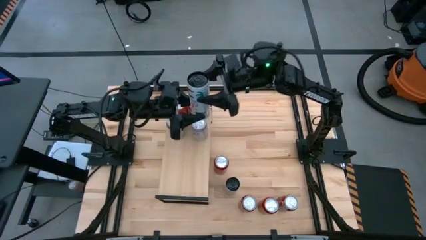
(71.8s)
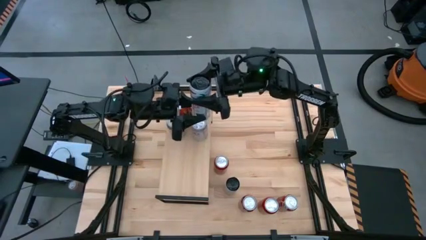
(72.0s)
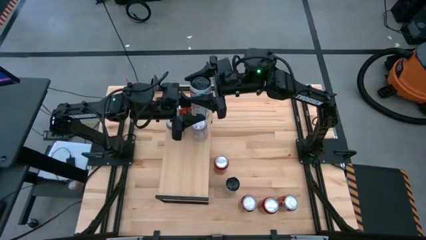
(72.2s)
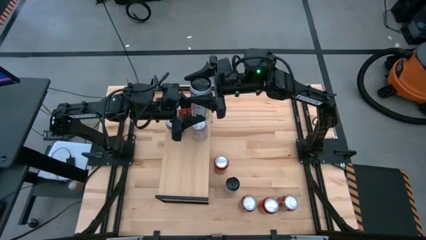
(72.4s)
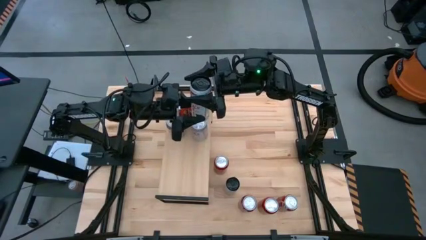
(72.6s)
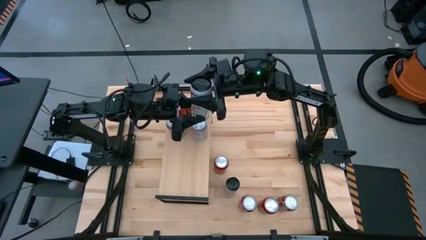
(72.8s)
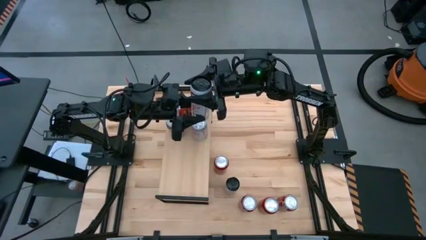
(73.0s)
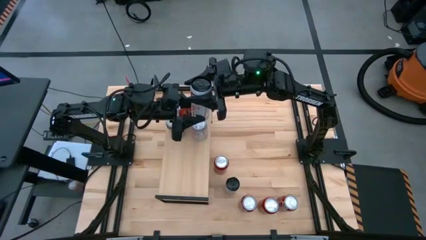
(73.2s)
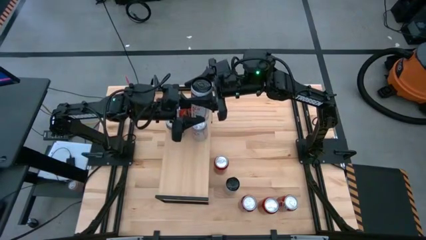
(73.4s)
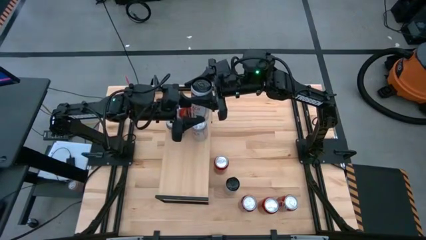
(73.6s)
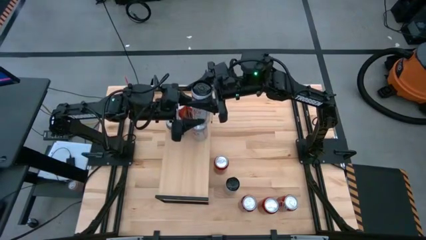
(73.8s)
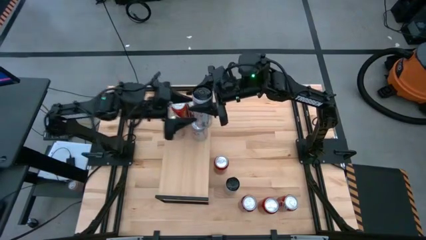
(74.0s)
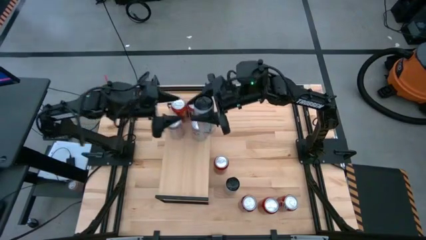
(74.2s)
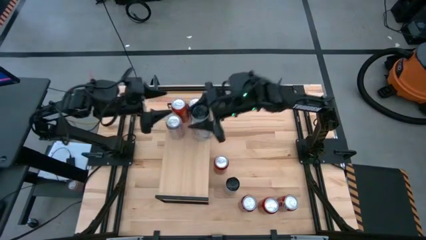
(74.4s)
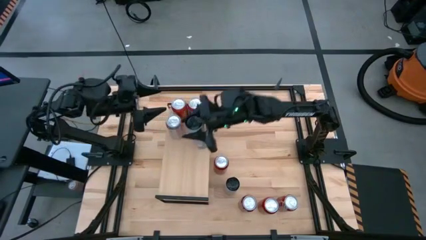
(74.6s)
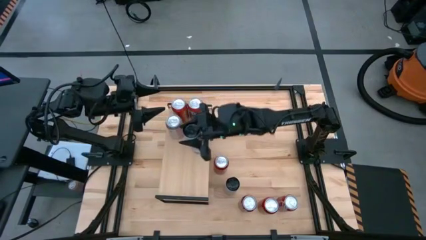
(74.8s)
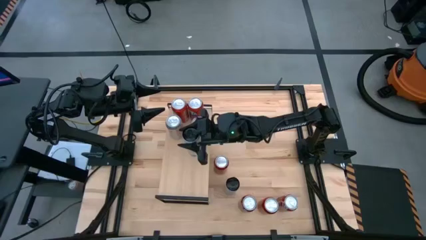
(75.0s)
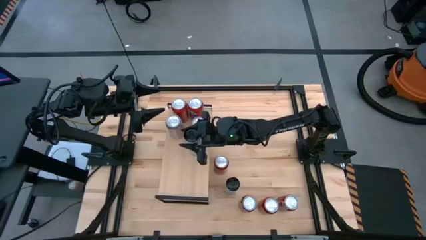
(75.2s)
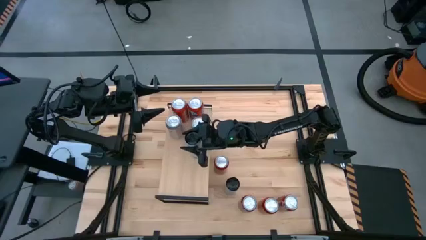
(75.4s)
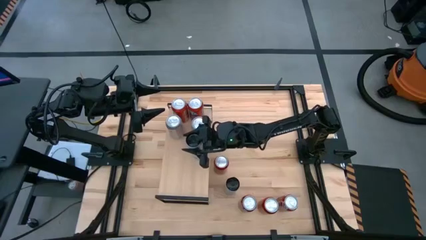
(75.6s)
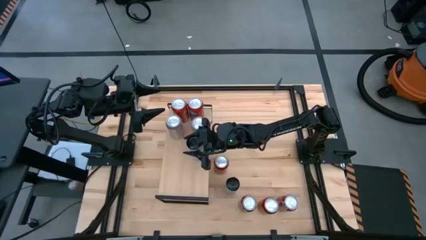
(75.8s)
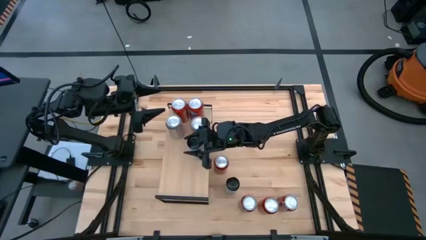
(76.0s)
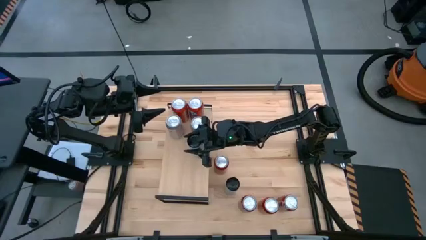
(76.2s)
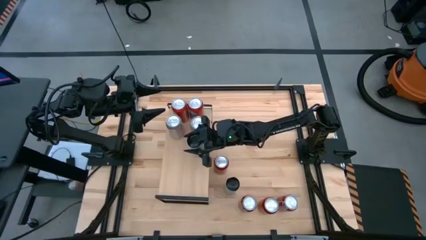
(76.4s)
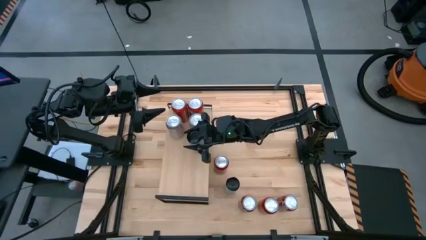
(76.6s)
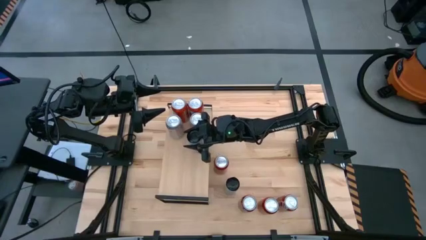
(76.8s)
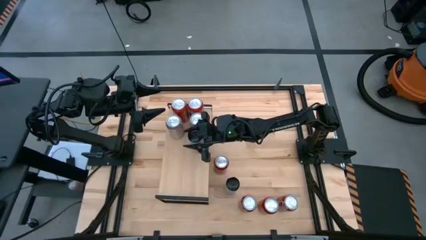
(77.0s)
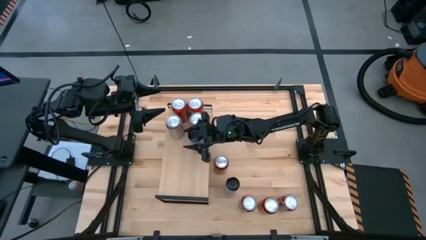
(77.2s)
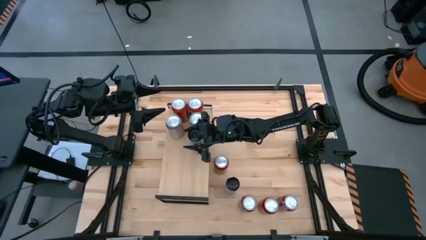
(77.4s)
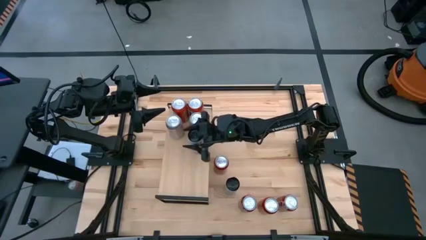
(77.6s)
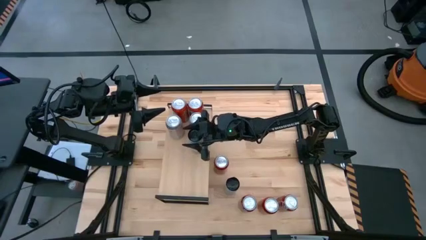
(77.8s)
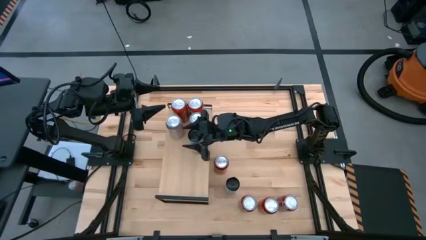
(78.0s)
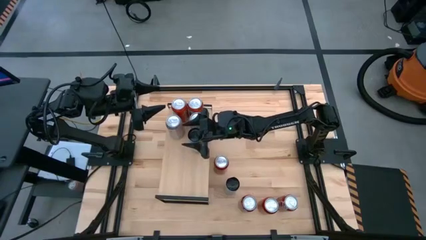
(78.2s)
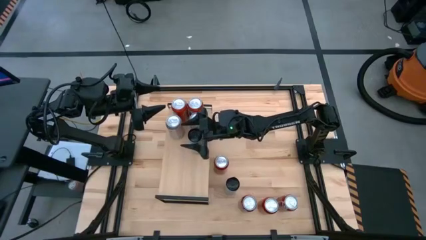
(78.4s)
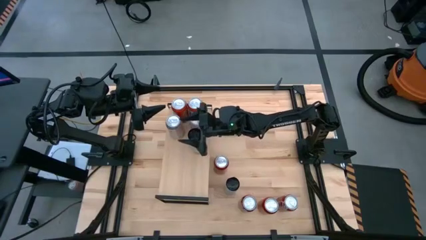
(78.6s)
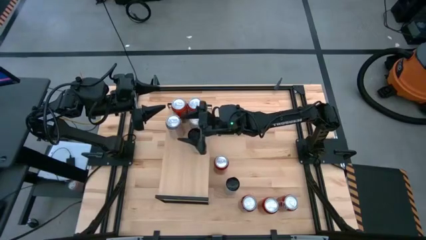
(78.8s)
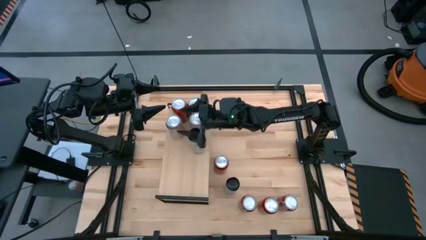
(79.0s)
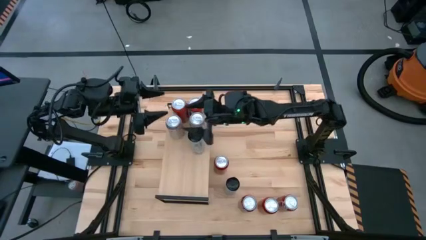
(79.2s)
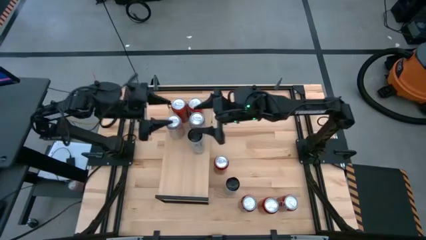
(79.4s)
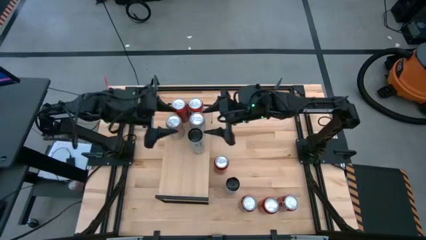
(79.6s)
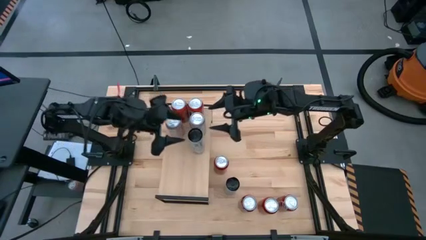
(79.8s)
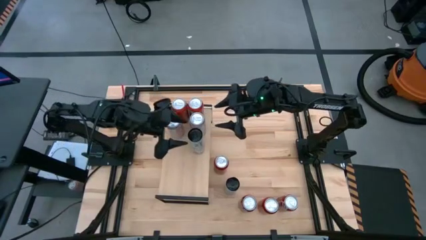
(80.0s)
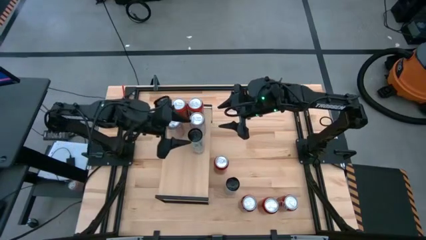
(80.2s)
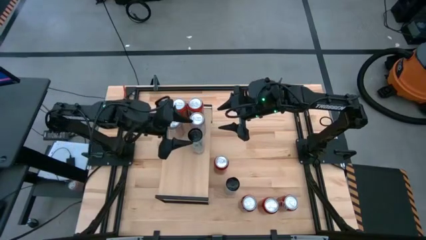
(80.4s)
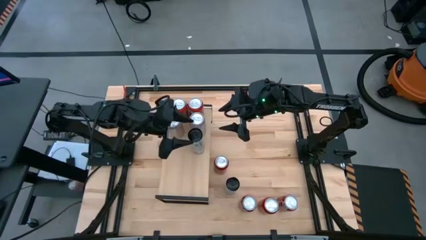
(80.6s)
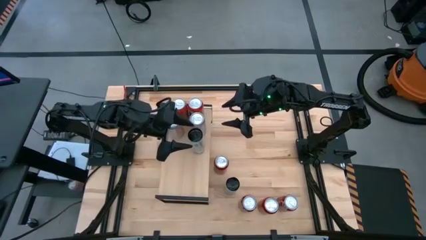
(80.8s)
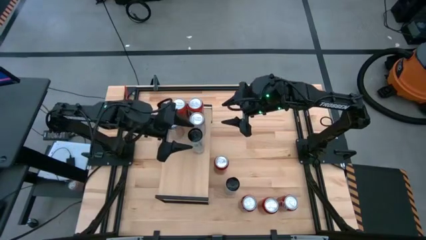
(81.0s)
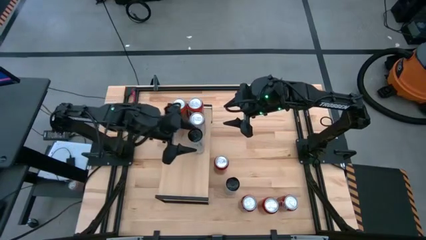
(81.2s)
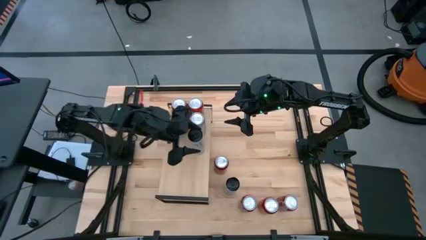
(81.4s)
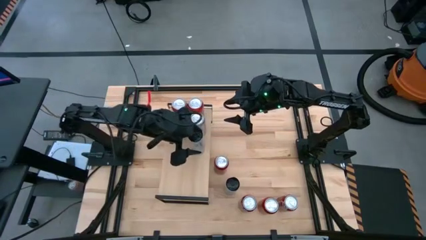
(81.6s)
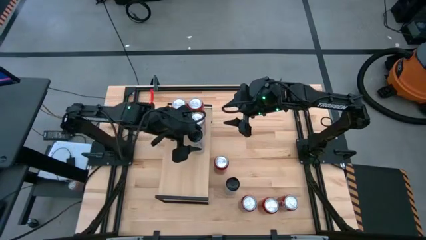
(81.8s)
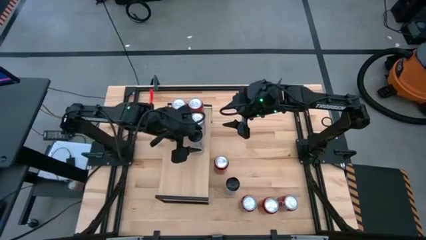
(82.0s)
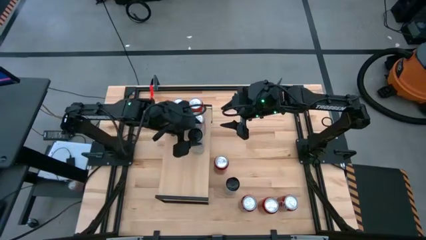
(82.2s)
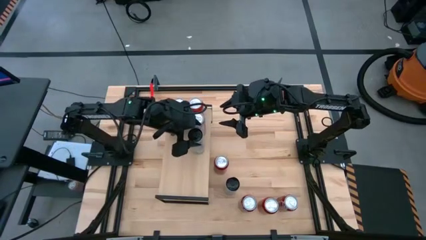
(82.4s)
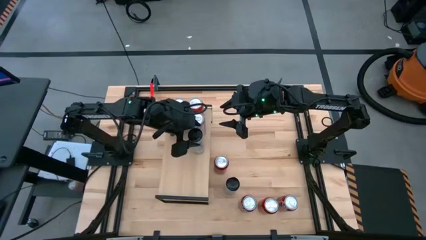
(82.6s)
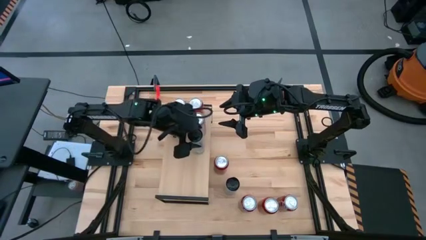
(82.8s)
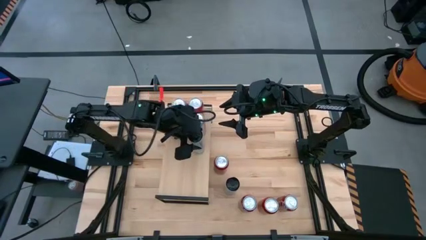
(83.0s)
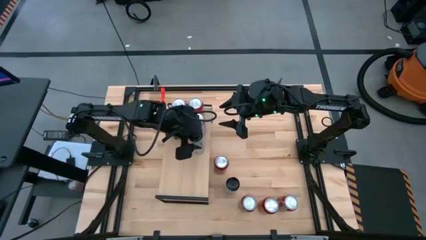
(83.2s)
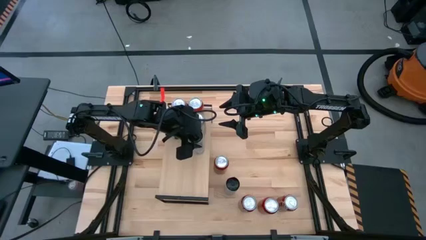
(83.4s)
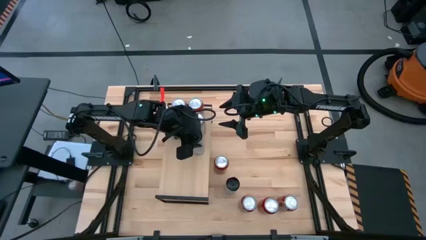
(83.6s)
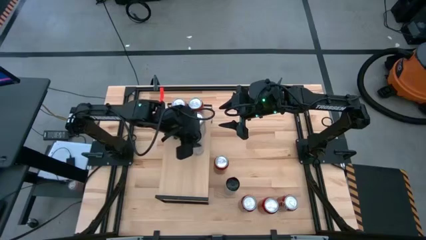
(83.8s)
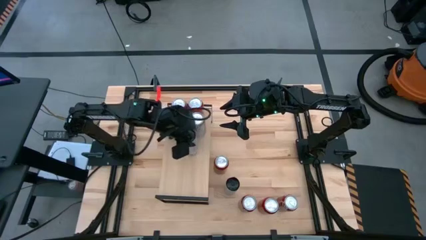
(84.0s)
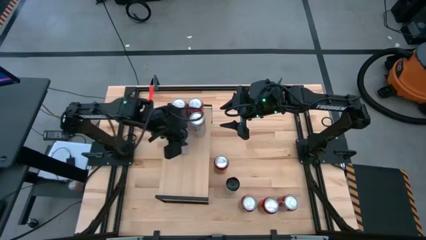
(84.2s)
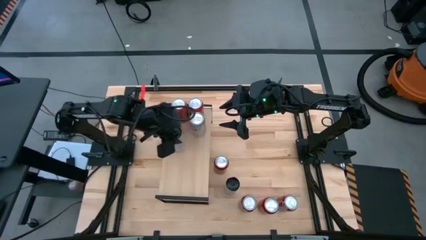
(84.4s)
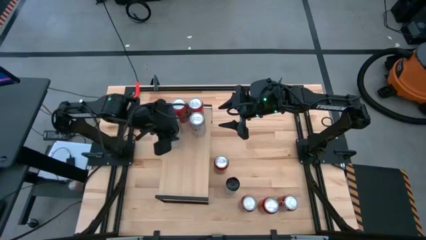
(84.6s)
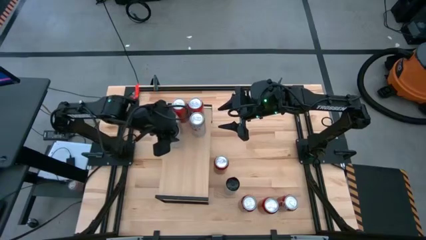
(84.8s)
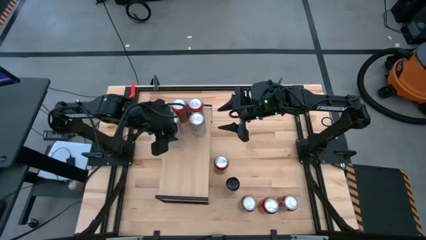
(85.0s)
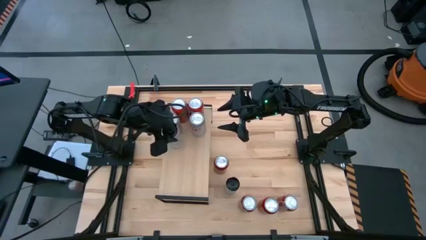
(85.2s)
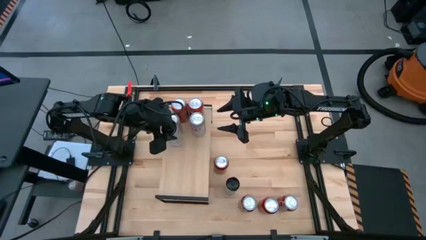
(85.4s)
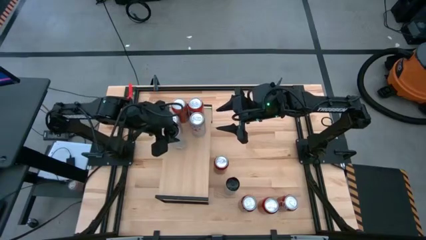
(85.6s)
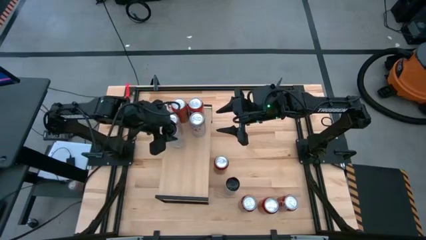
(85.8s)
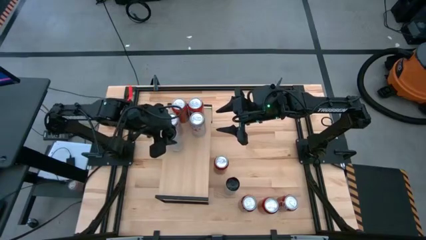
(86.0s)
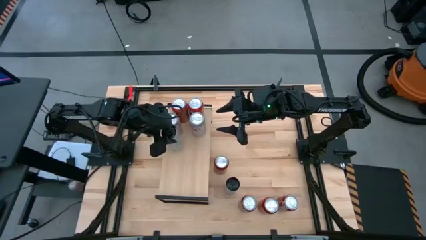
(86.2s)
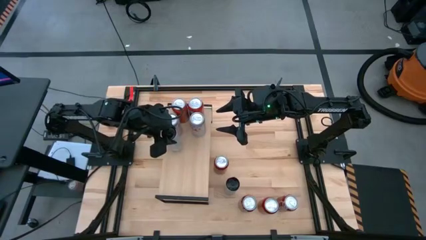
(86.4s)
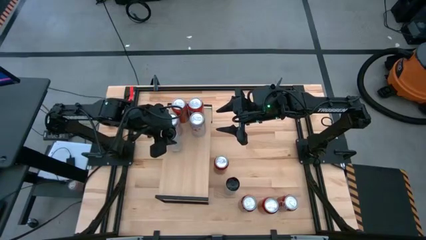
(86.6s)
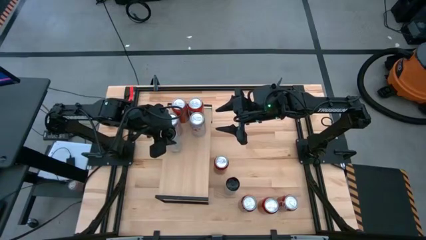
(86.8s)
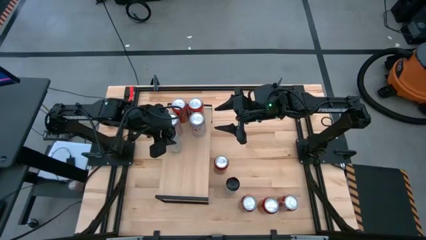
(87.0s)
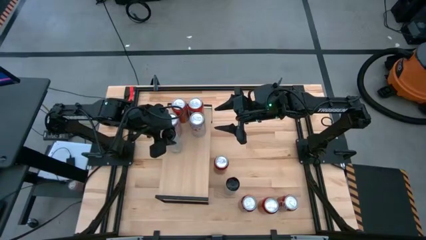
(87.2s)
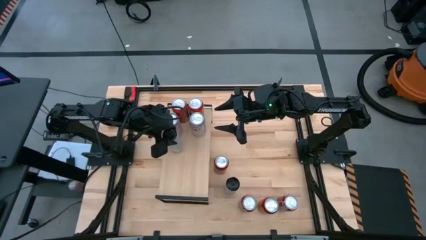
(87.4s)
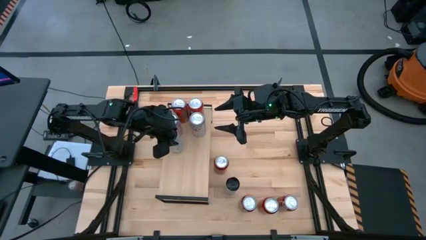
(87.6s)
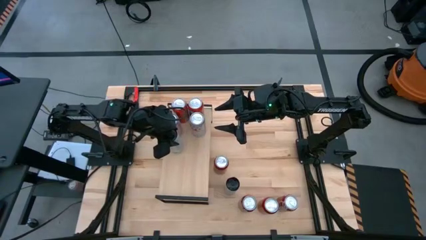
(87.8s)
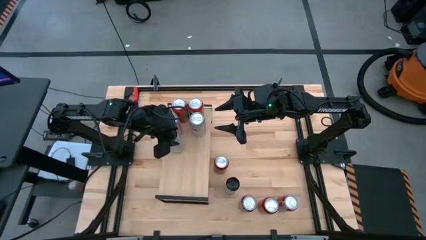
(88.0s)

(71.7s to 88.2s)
Task: Pick and place cans onto a shelf
Put the top white-pink soda can on the shelf

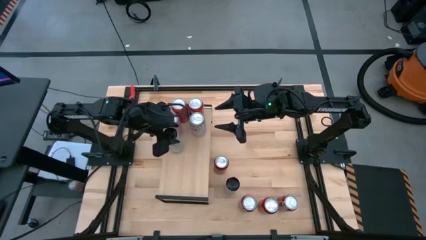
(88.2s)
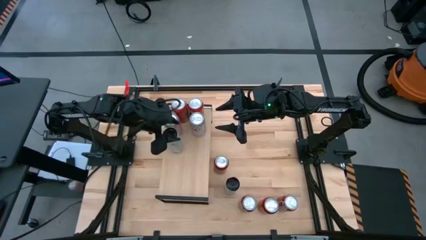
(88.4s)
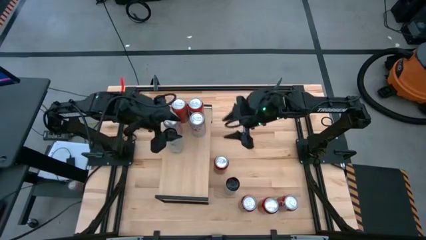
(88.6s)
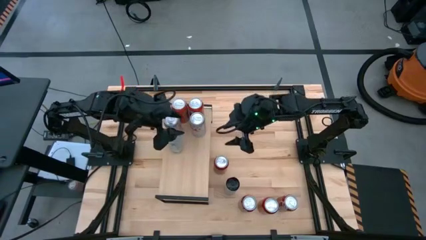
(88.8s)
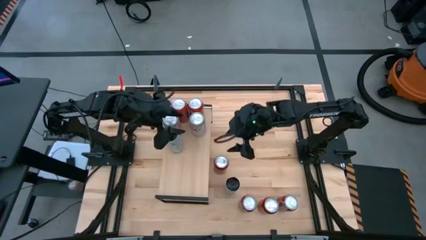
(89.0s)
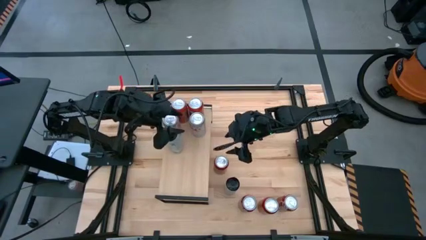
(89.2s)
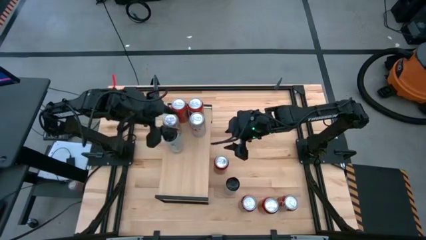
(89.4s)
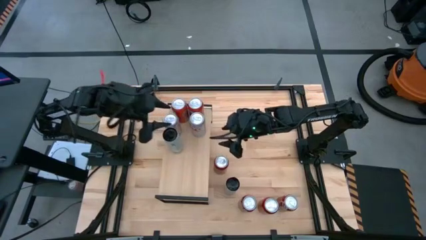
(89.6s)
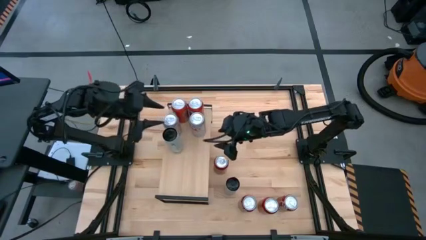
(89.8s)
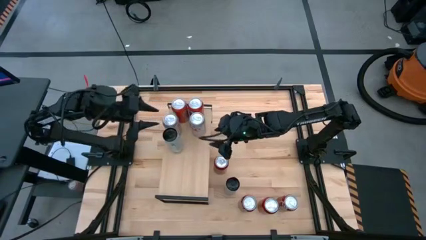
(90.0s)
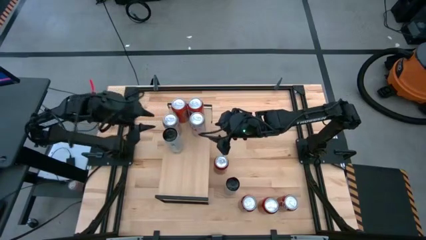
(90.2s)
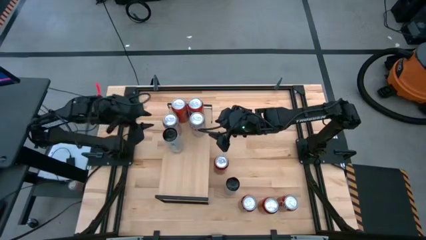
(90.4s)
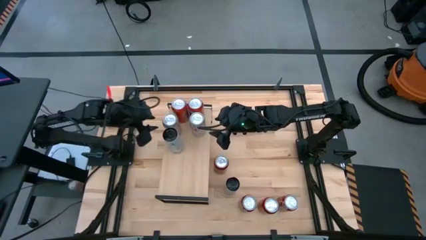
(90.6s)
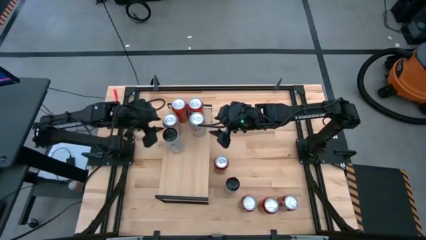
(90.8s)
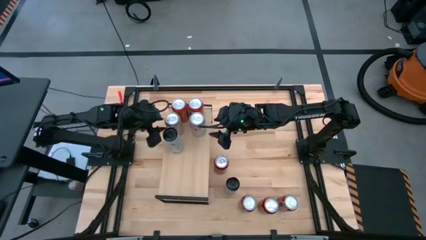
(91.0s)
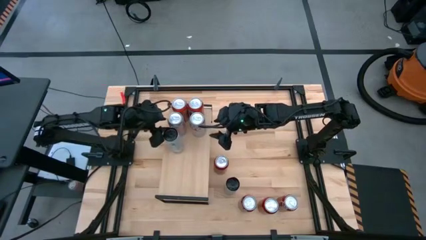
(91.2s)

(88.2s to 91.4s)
Adjust the red-silver soda can on the shelf
